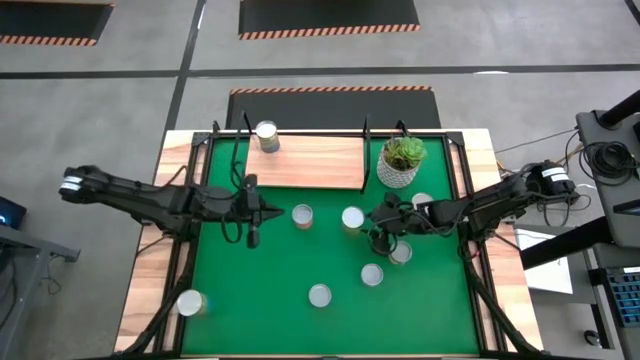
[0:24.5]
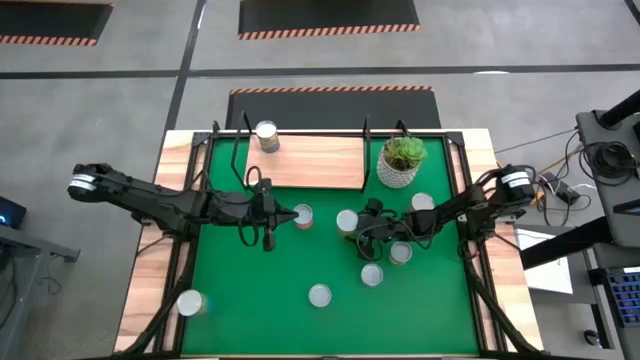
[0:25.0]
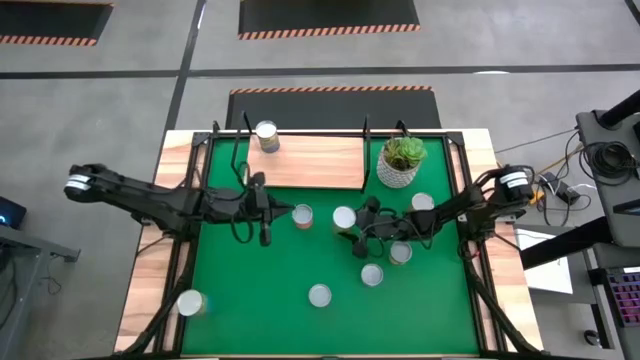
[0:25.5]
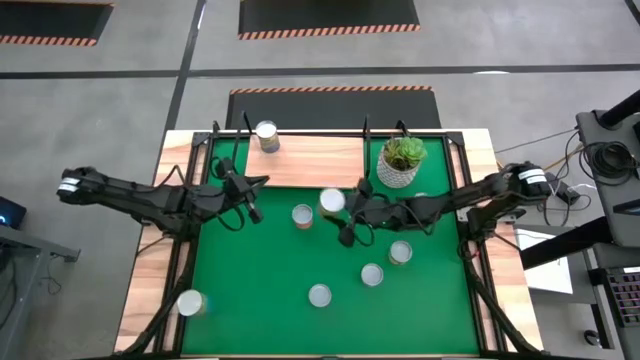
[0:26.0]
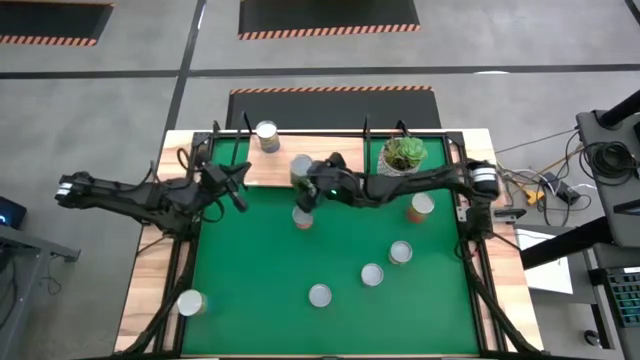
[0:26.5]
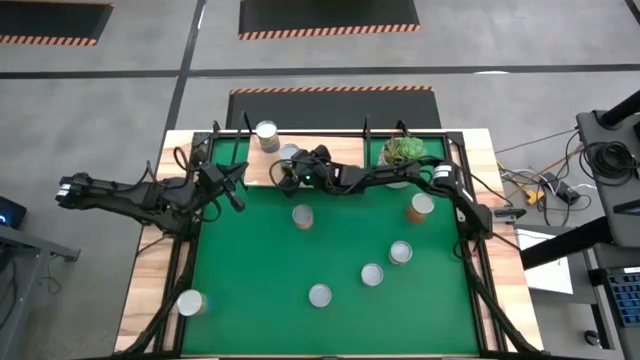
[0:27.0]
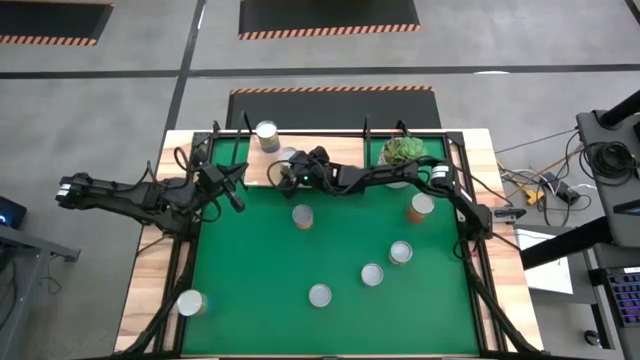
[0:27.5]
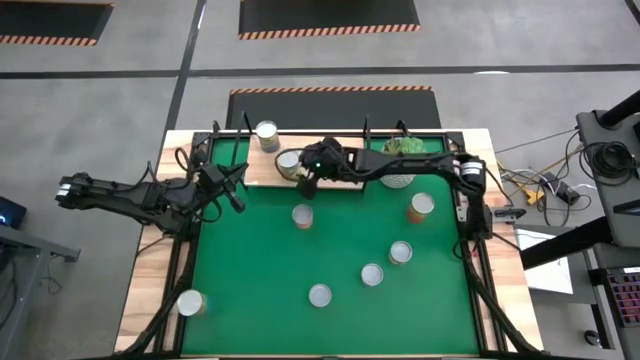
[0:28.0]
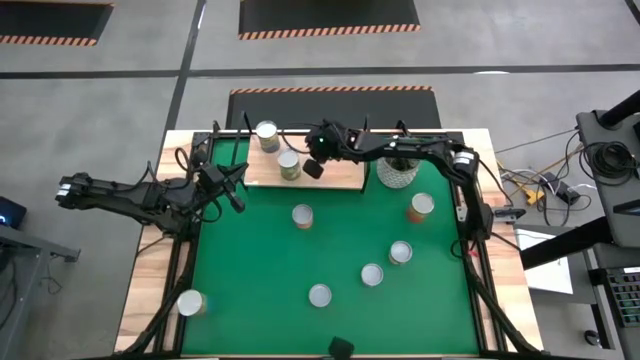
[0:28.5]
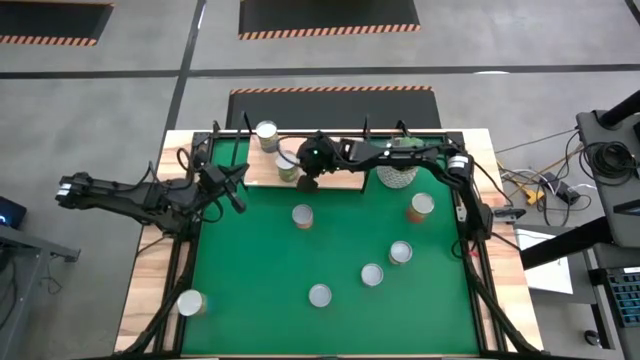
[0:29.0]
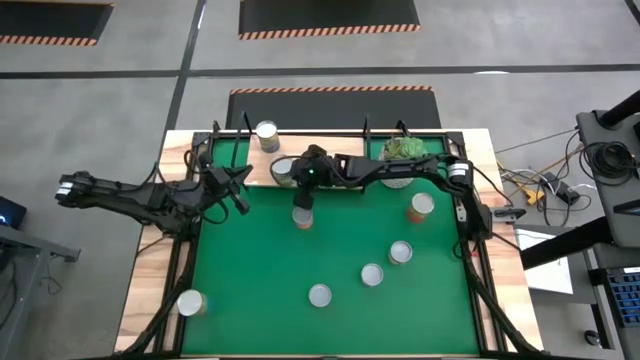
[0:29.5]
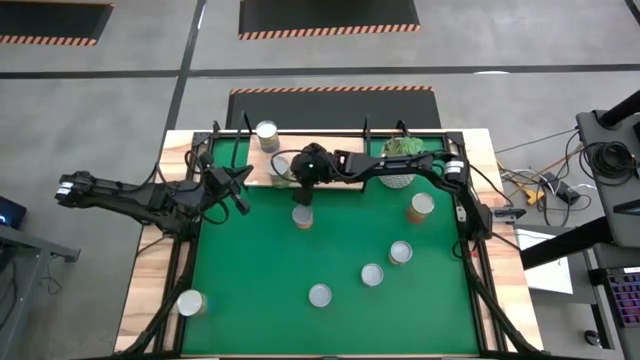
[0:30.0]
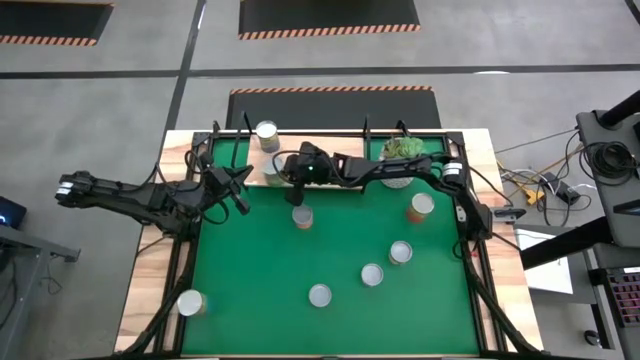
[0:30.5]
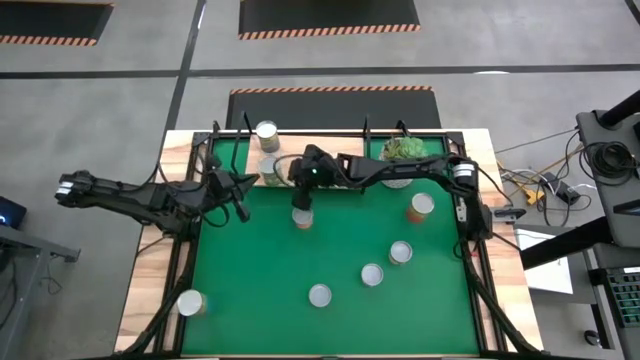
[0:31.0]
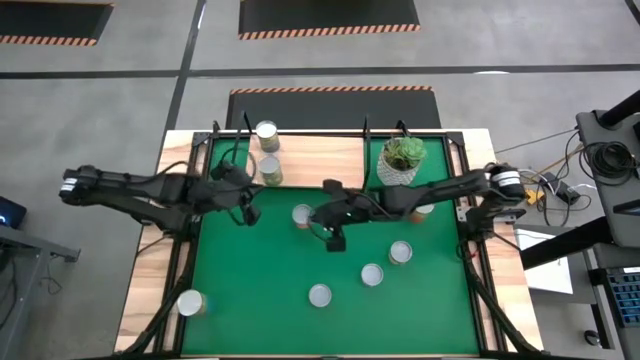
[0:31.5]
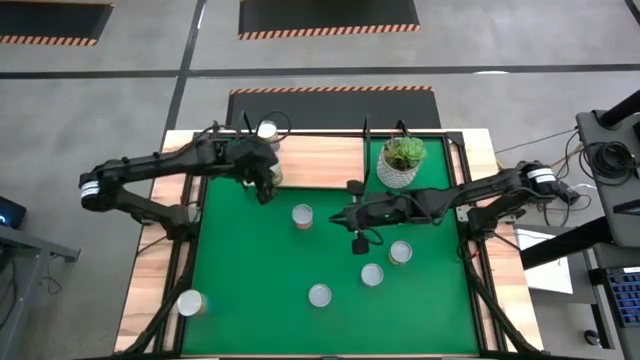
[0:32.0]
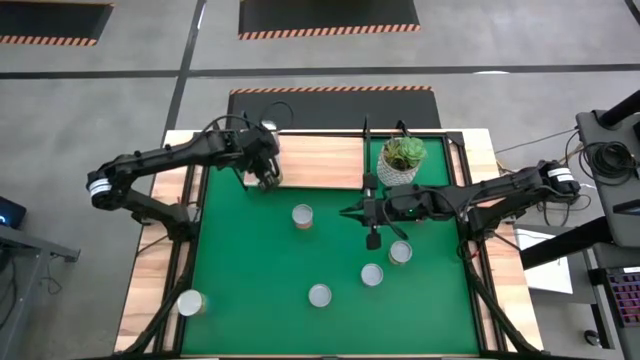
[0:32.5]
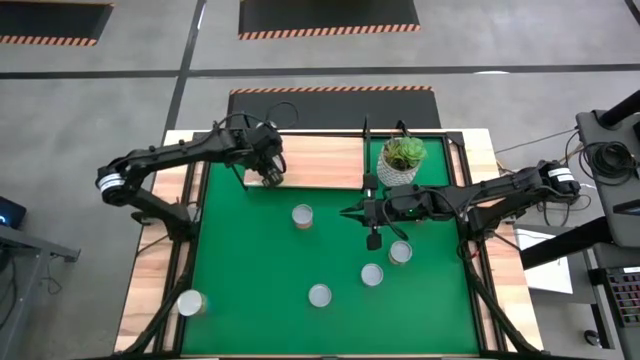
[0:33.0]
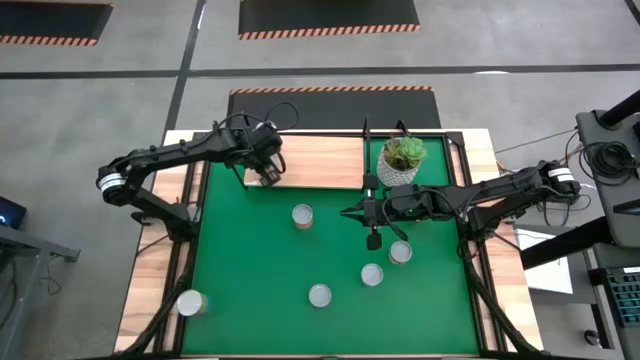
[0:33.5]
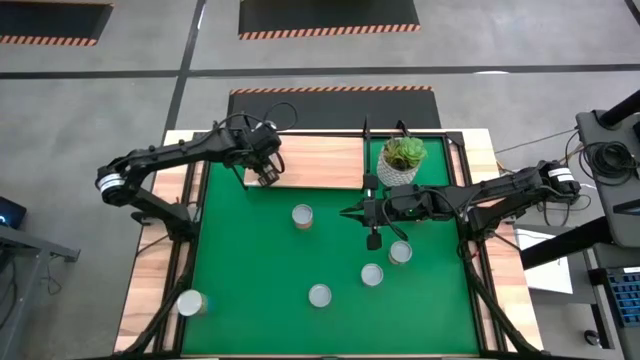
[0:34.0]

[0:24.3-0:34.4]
Task: Pick and place cans onto a shelf
Put the canned pears on the shelf

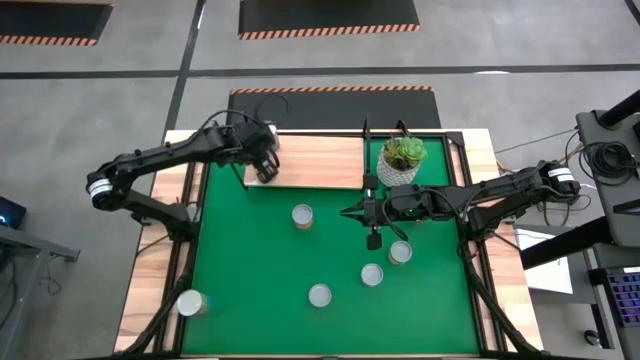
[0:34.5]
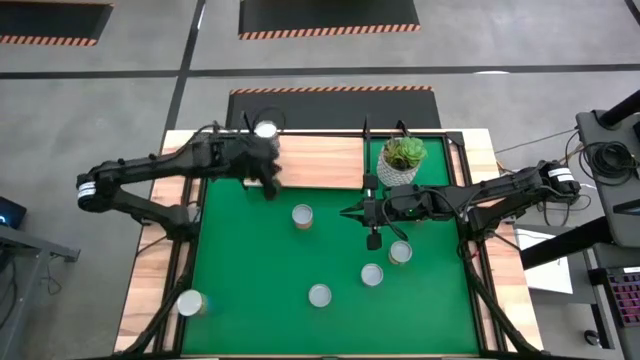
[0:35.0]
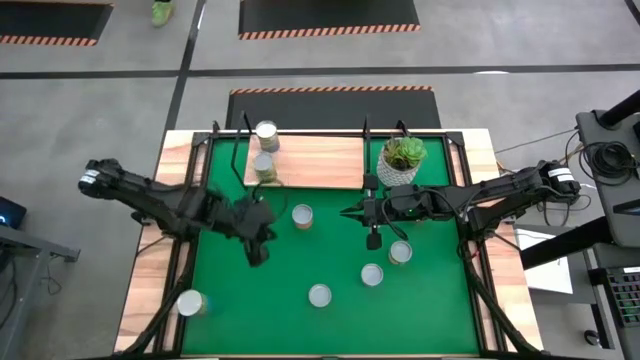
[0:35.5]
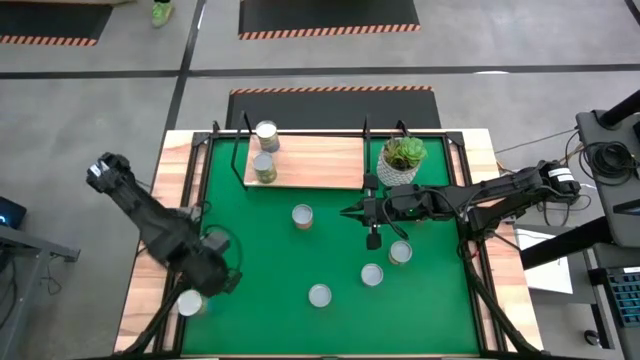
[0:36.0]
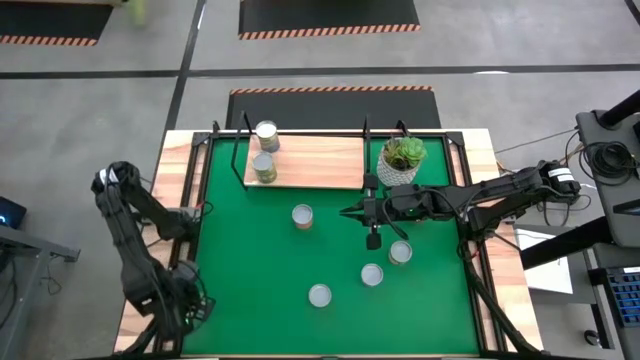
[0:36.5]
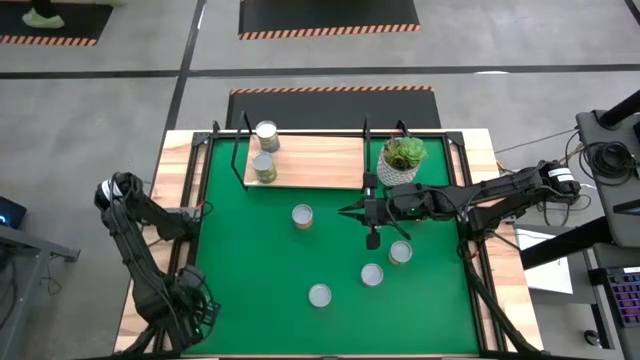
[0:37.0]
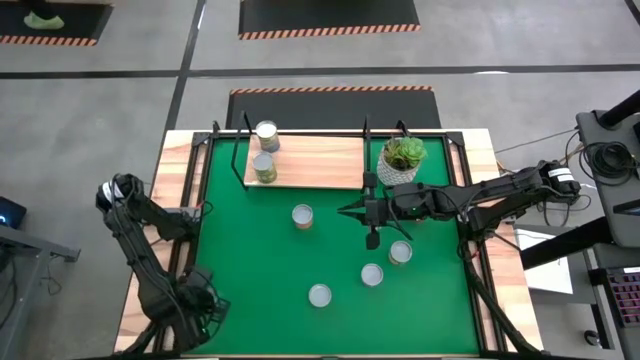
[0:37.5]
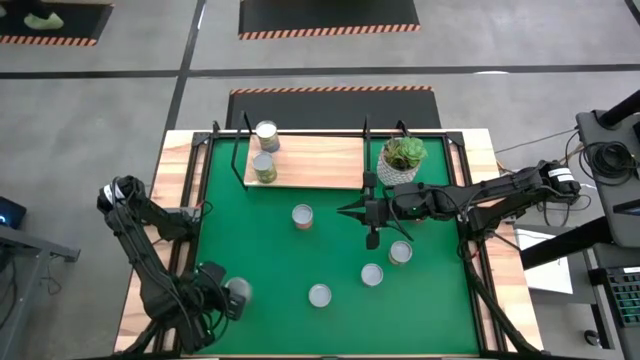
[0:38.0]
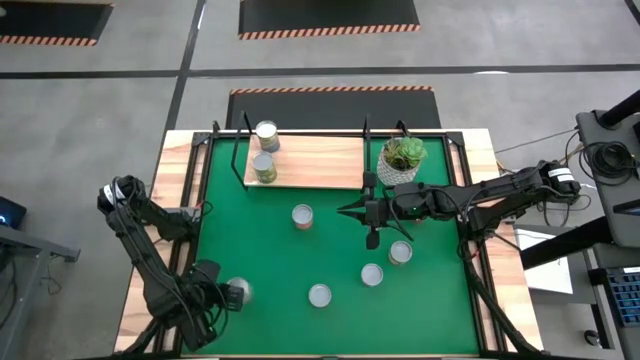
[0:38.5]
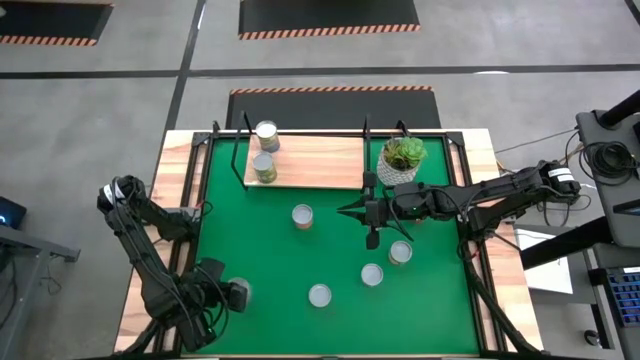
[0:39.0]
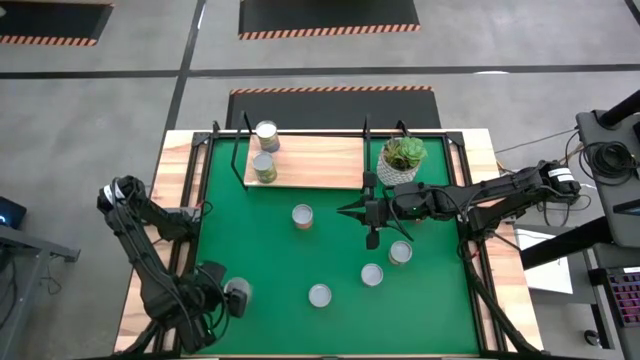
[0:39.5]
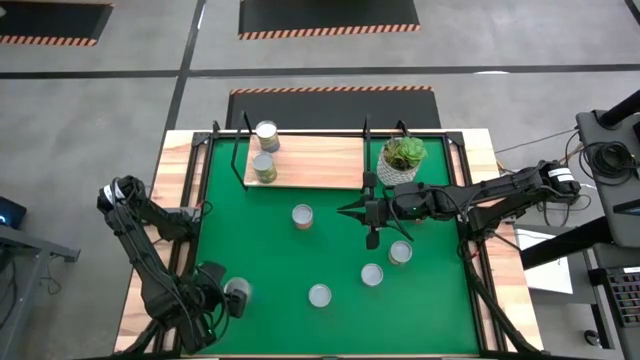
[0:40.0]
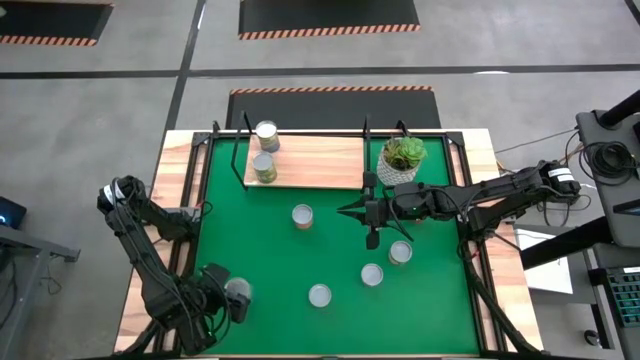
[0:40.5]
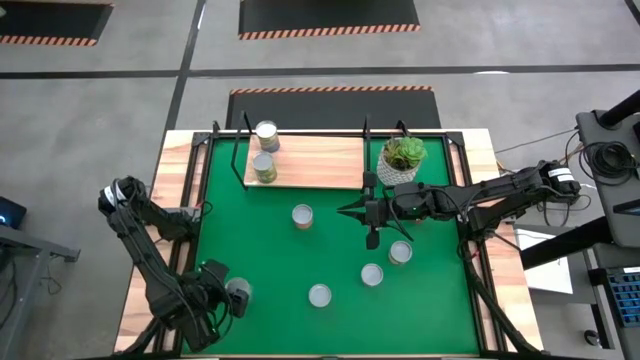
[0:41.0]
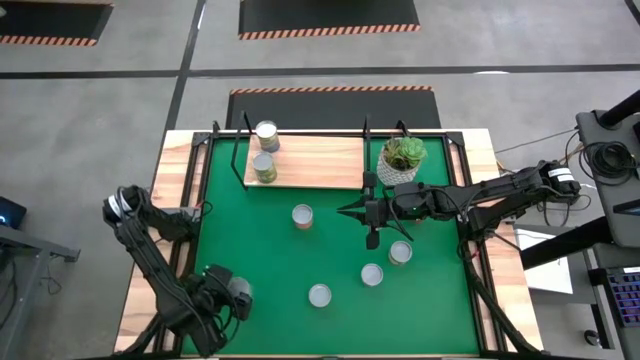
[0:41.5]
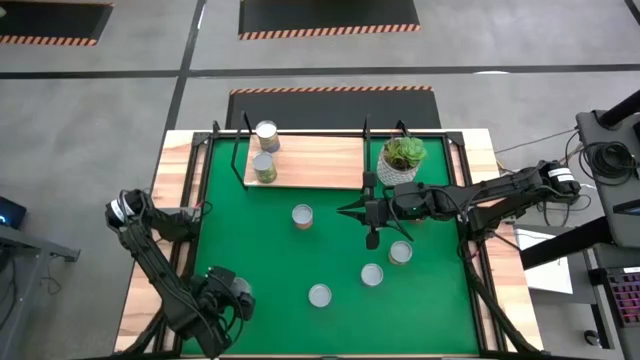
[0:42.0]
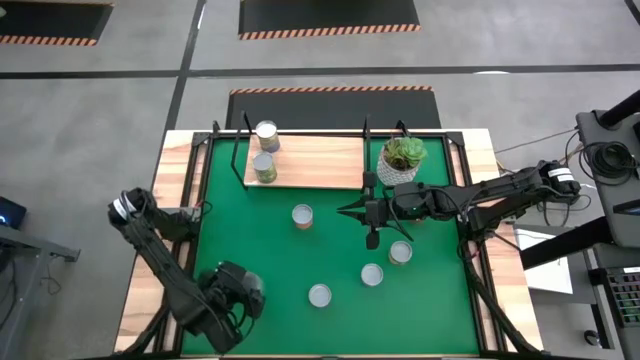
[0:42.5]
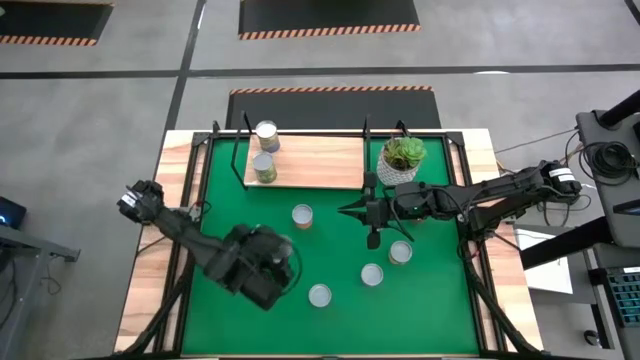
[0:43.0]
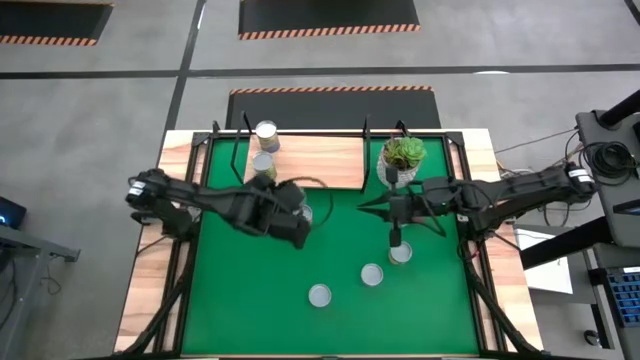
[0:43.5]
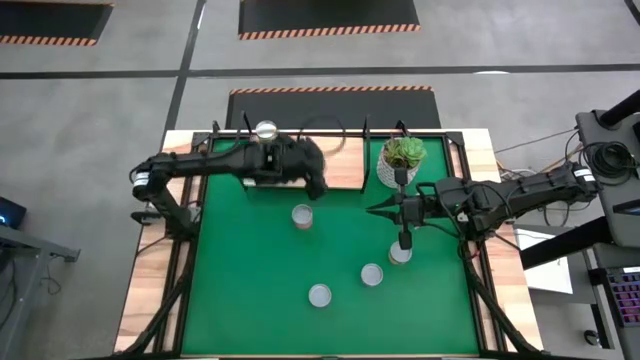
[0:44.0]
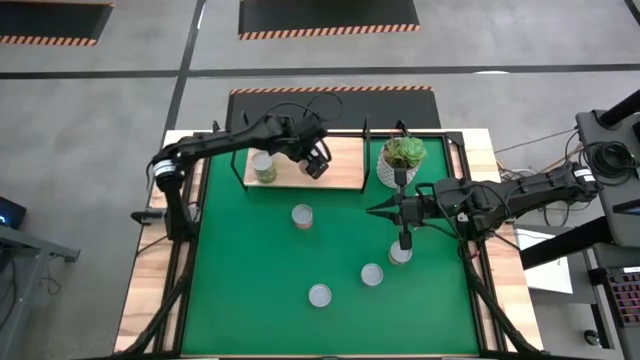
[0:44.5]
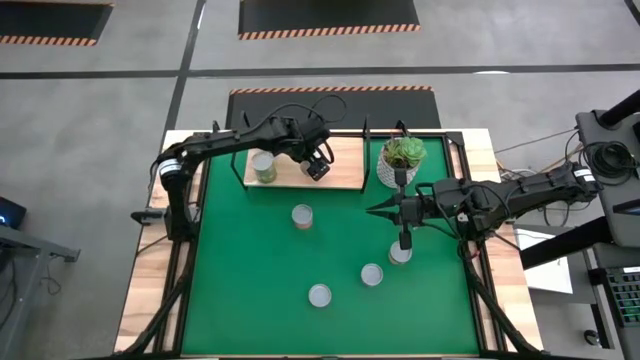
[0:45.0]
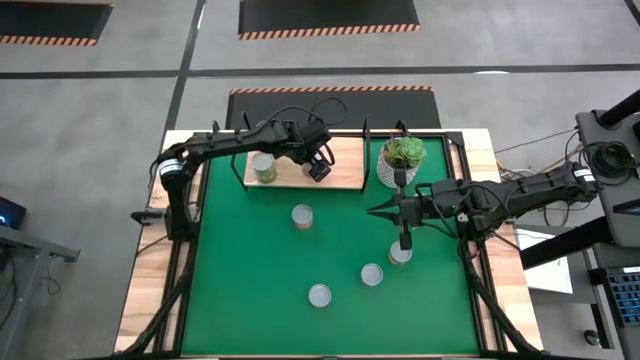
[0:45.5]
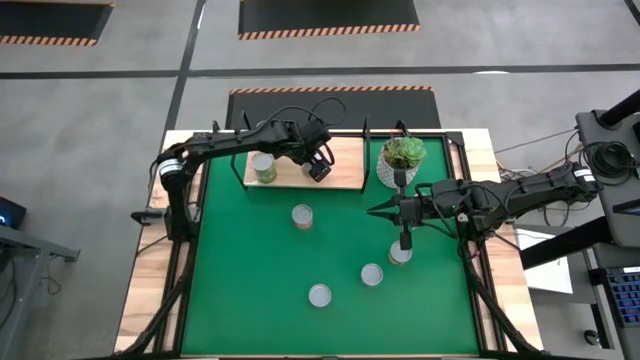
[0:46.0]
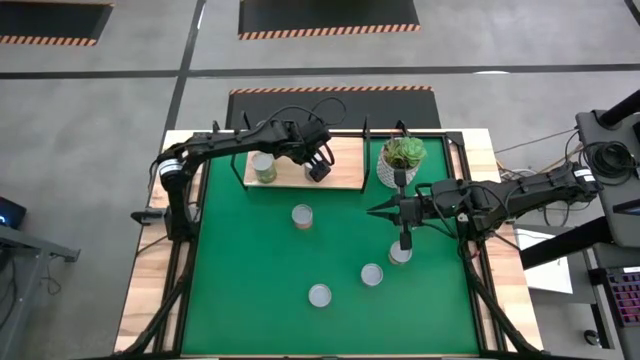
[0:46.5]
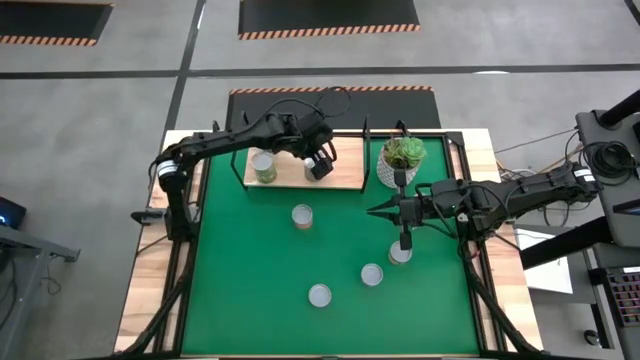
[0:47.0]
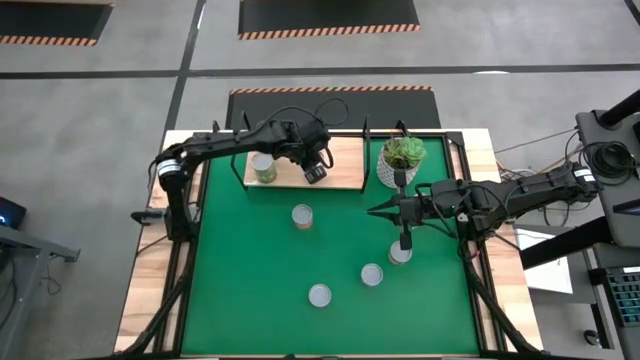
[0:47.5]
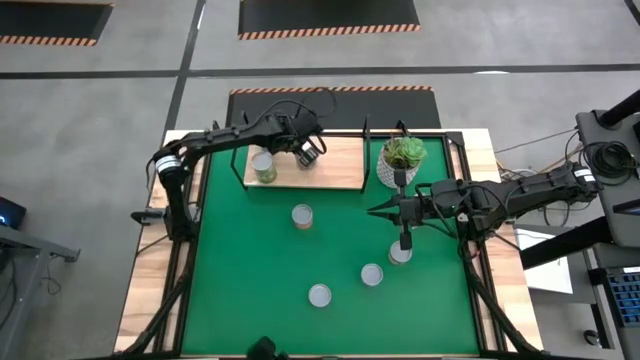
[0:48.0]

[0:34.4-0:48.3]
Put the canned cherries on the shelf
